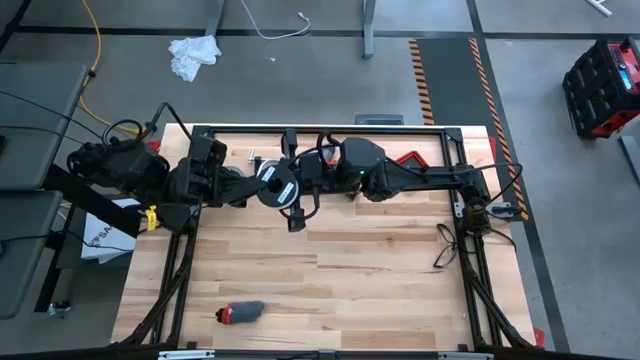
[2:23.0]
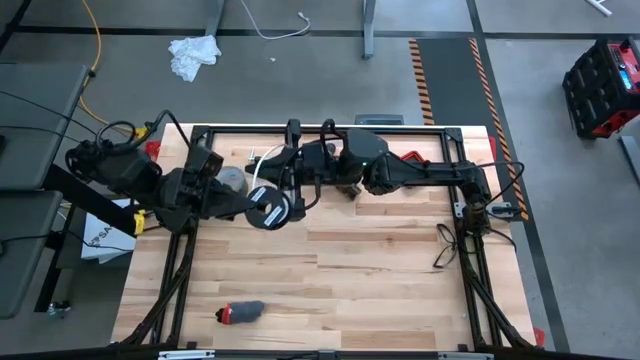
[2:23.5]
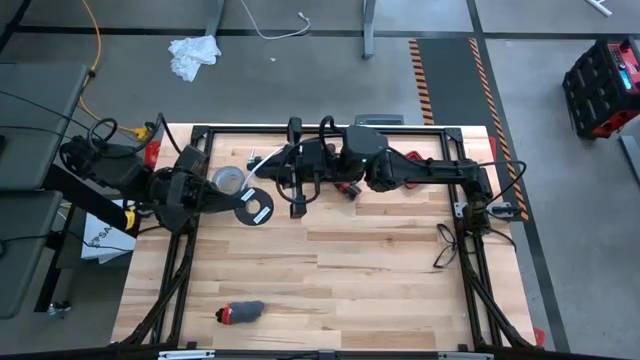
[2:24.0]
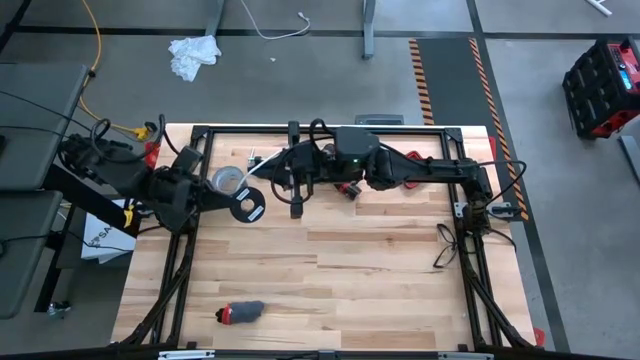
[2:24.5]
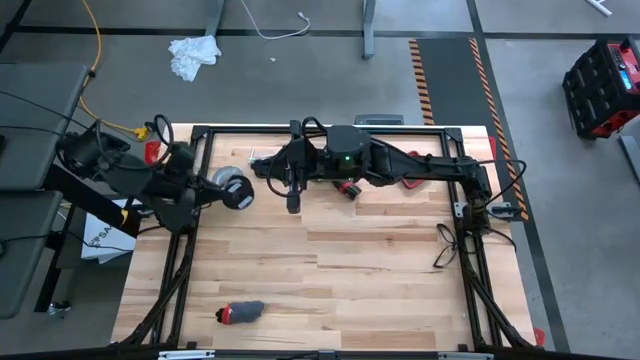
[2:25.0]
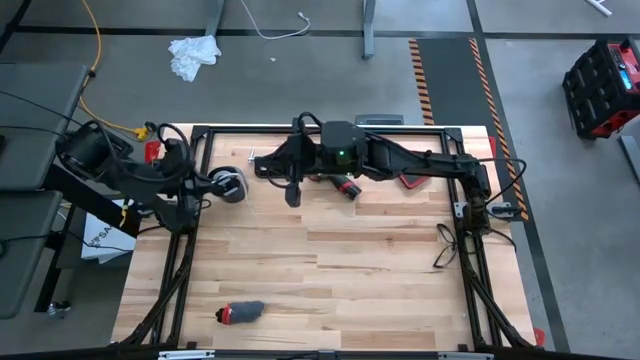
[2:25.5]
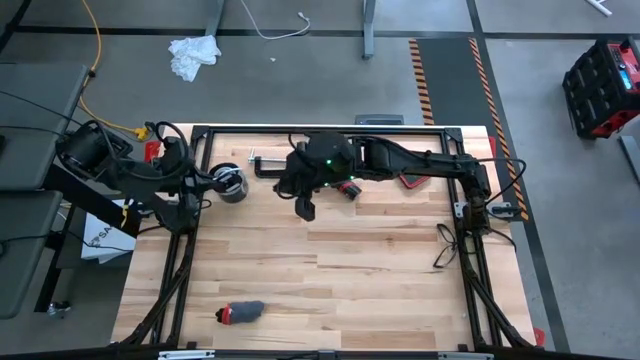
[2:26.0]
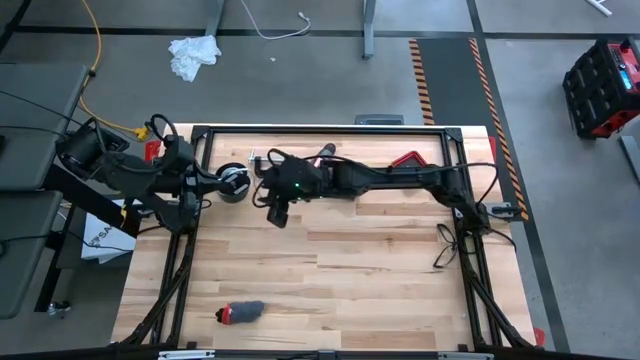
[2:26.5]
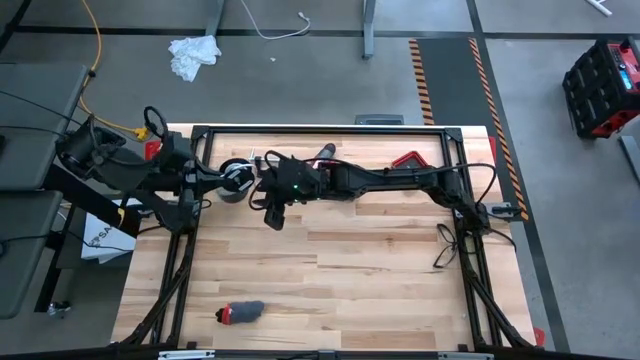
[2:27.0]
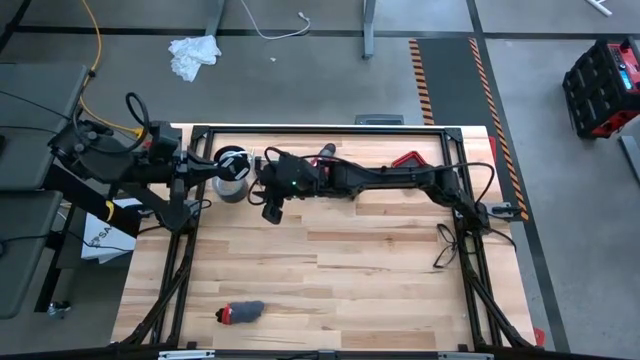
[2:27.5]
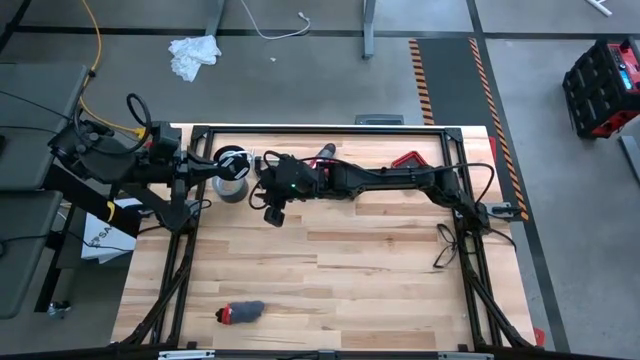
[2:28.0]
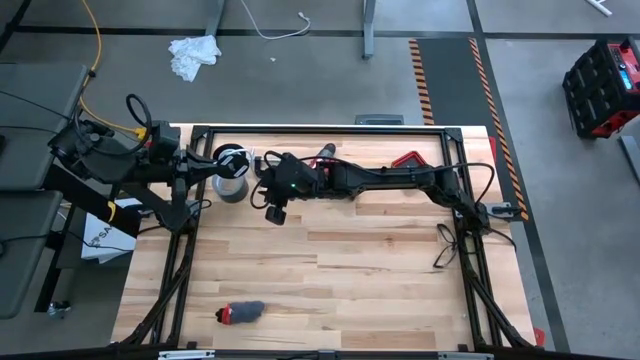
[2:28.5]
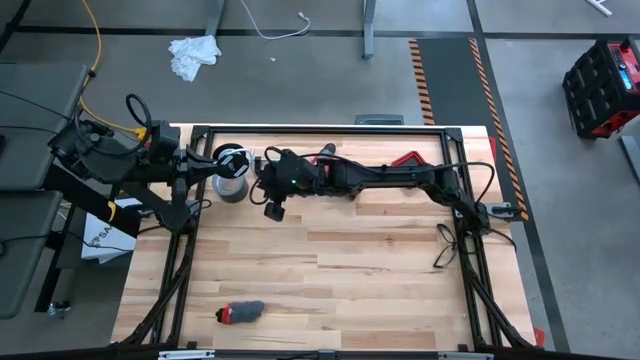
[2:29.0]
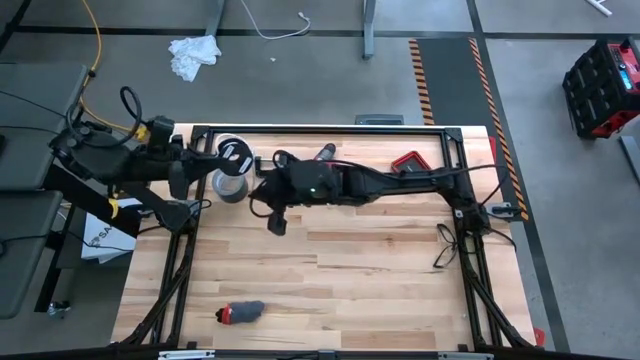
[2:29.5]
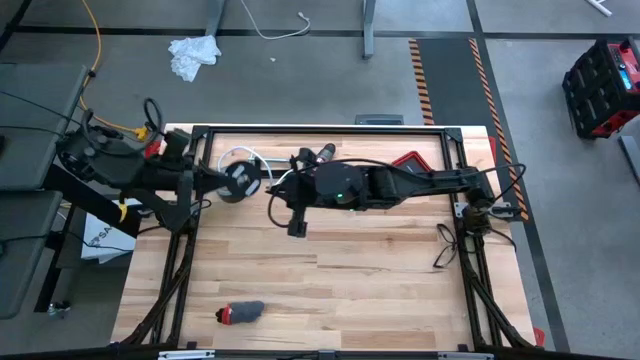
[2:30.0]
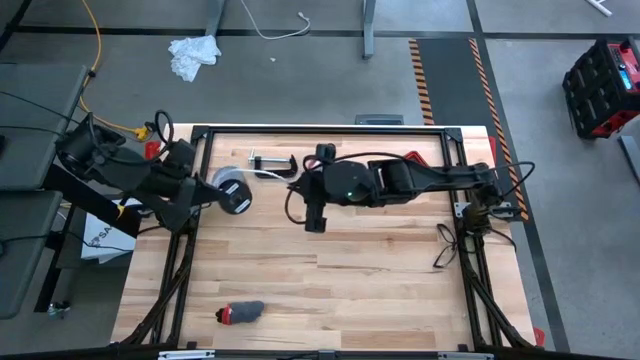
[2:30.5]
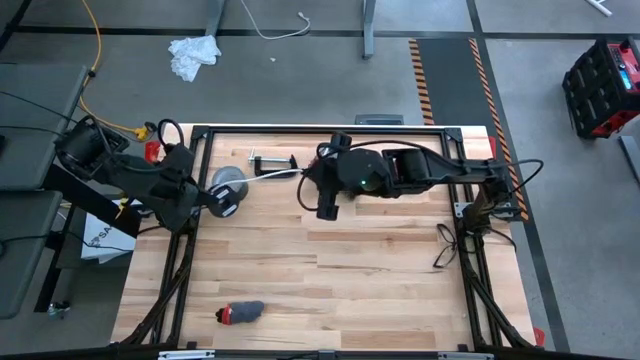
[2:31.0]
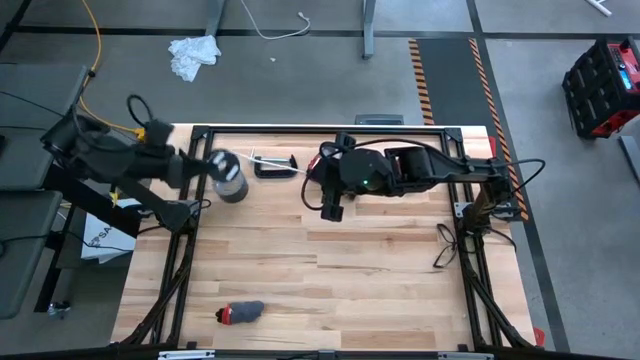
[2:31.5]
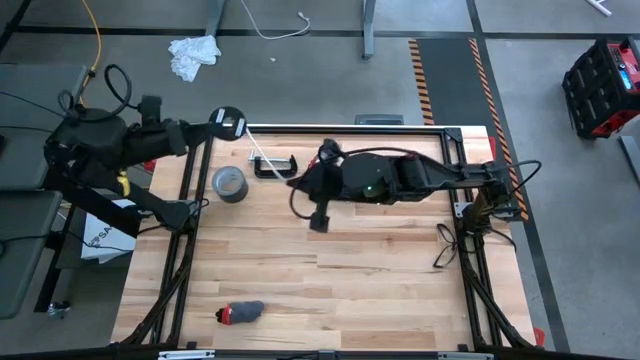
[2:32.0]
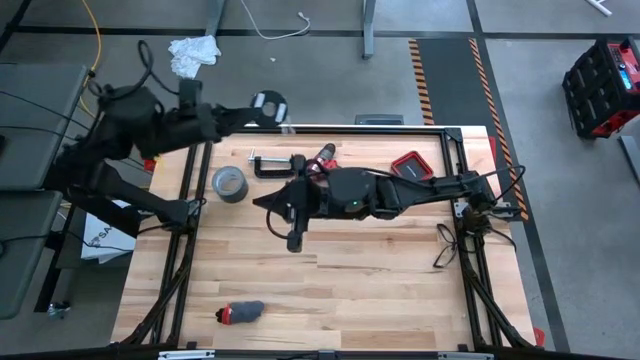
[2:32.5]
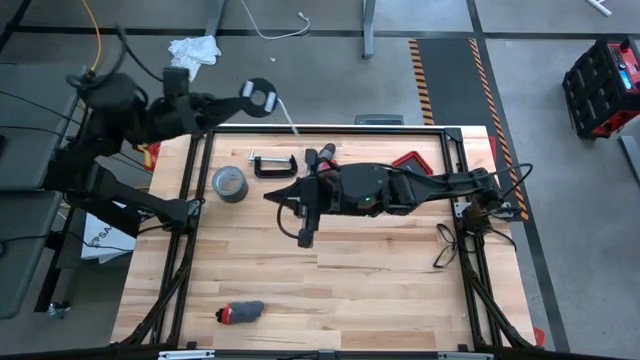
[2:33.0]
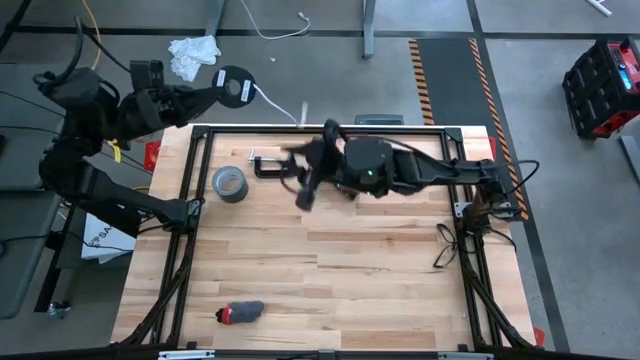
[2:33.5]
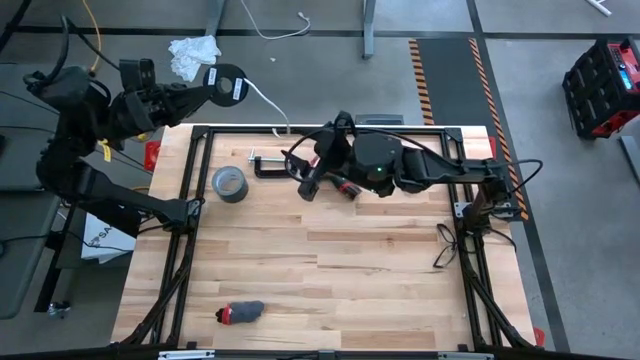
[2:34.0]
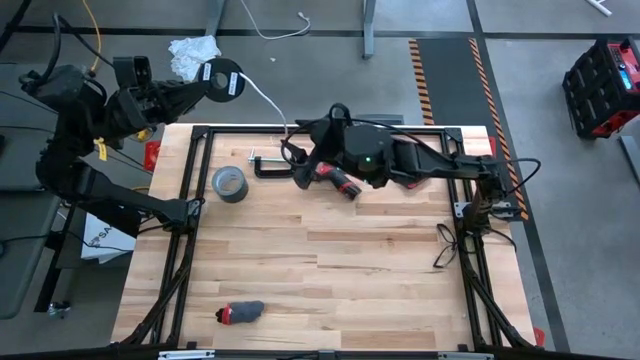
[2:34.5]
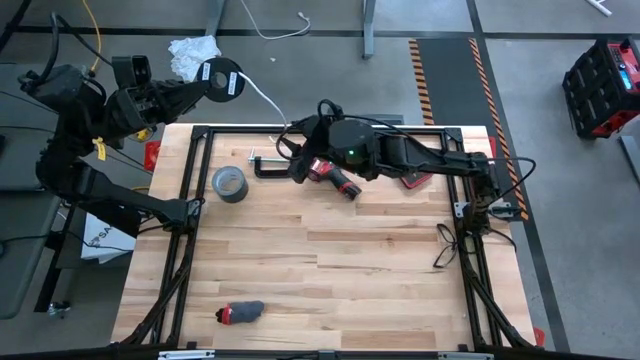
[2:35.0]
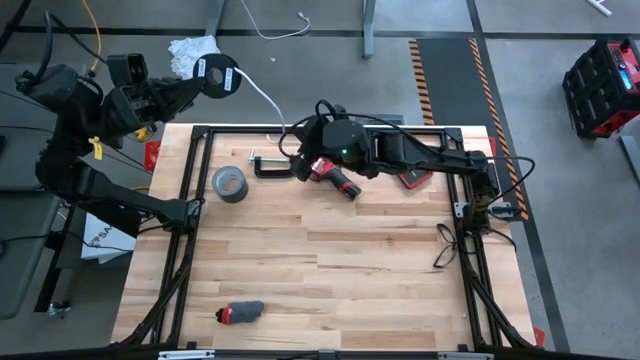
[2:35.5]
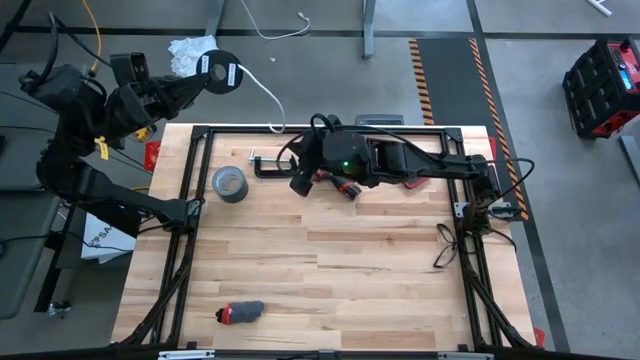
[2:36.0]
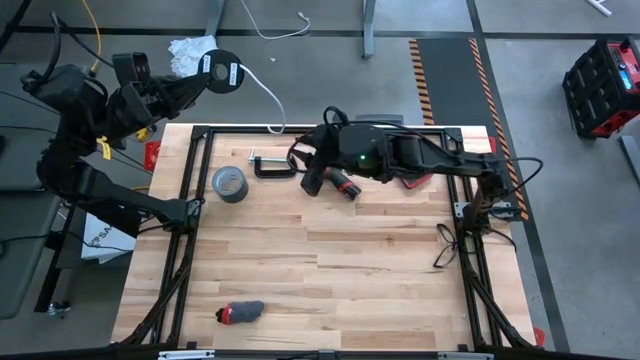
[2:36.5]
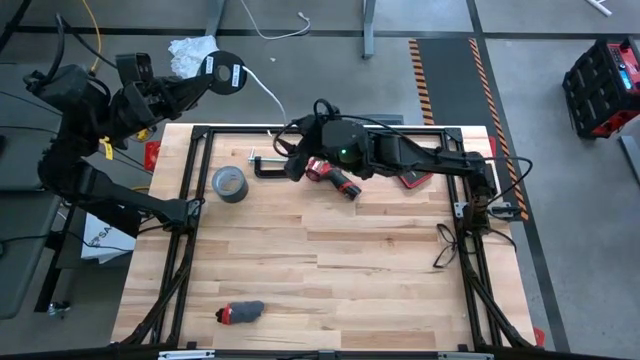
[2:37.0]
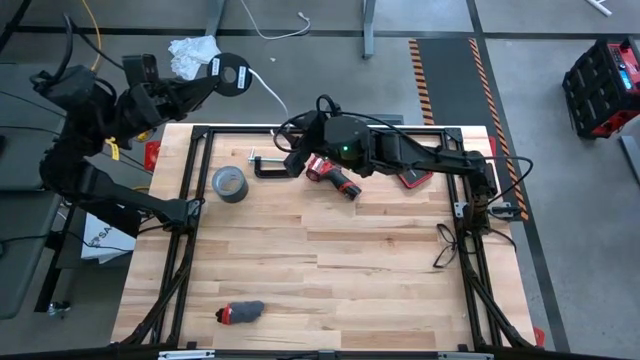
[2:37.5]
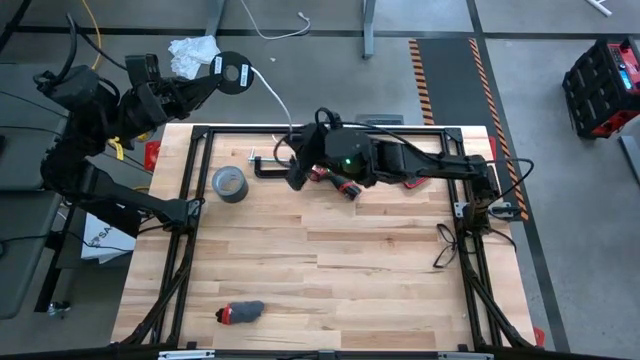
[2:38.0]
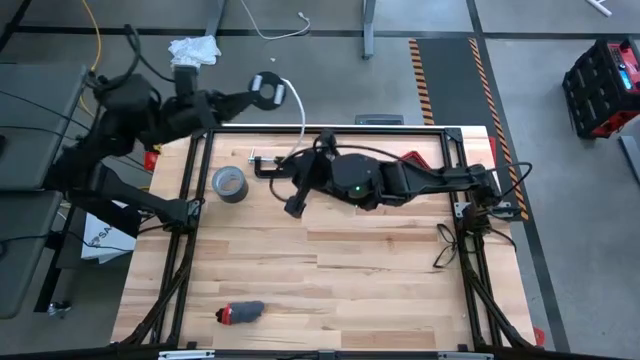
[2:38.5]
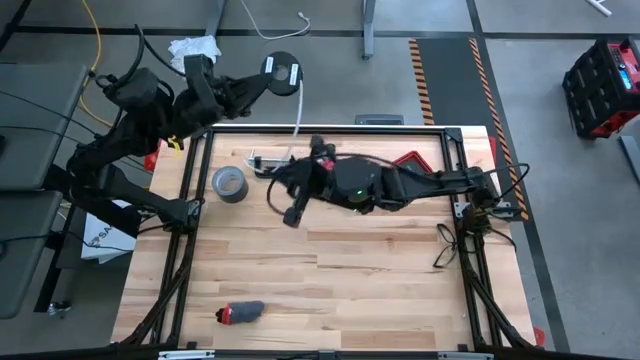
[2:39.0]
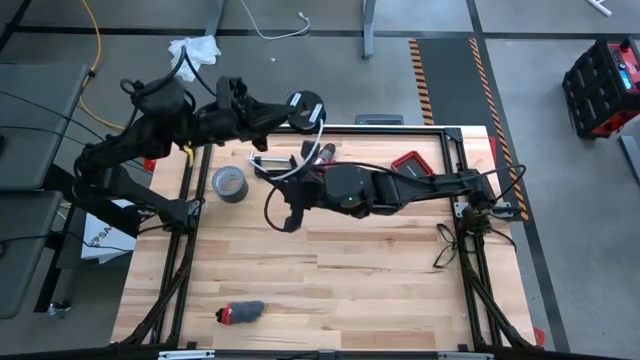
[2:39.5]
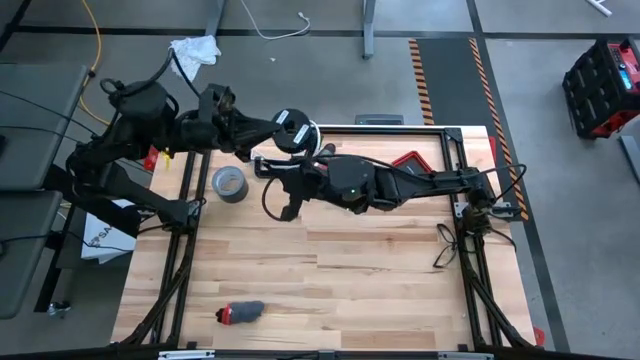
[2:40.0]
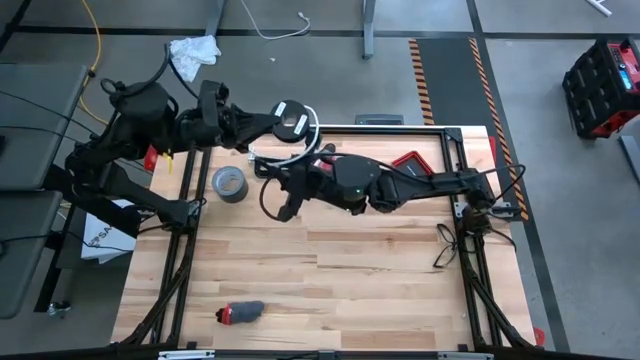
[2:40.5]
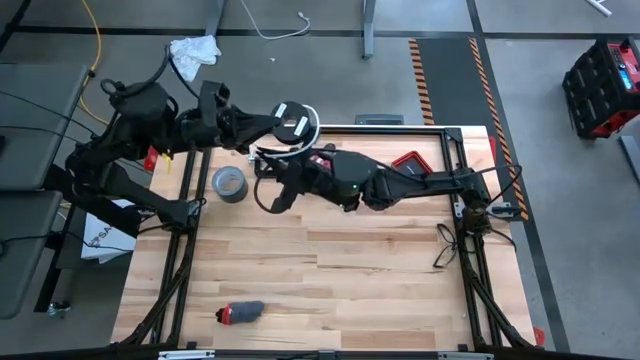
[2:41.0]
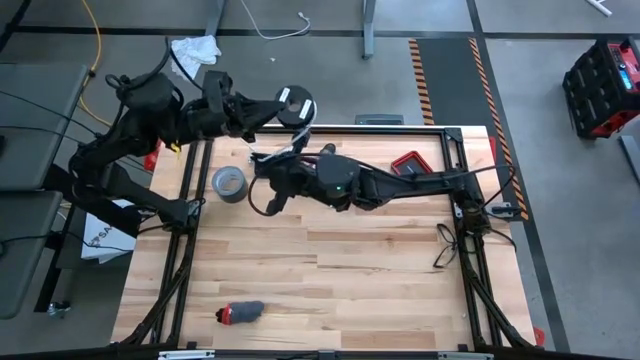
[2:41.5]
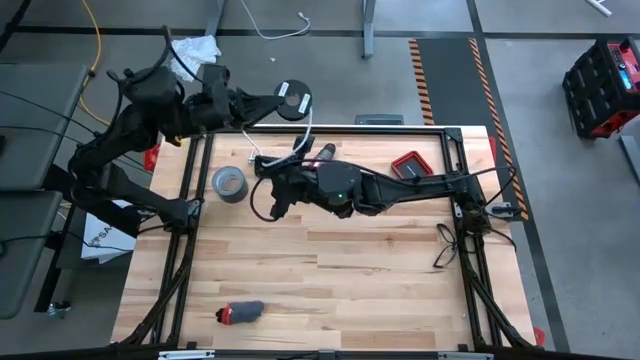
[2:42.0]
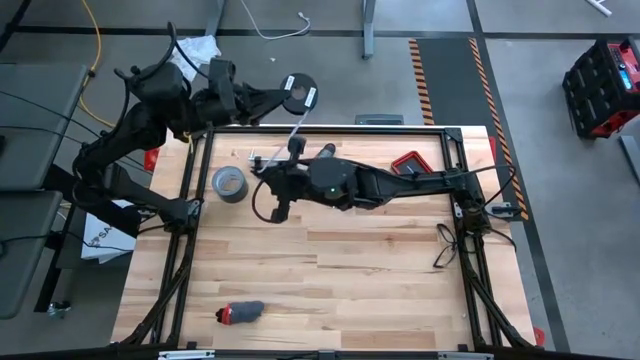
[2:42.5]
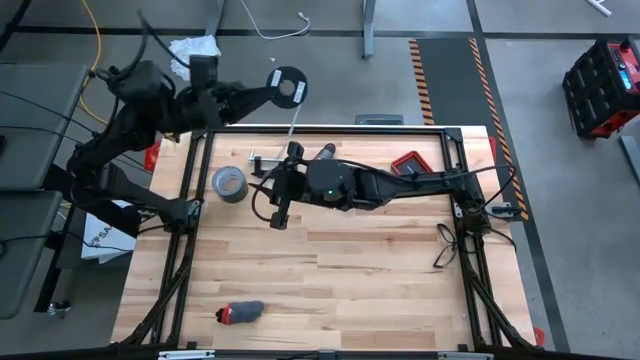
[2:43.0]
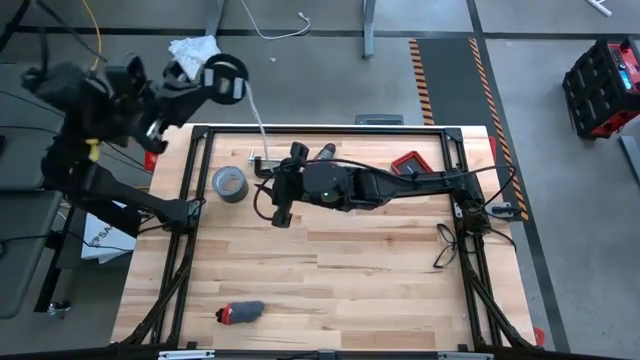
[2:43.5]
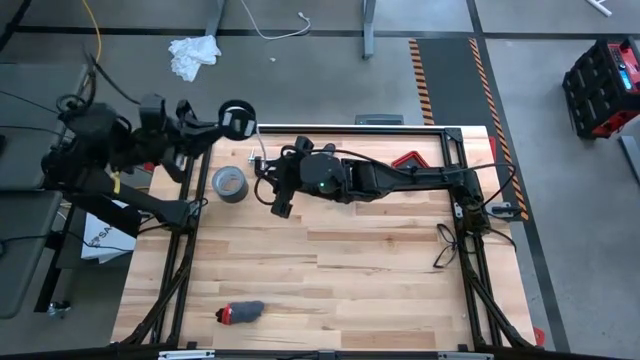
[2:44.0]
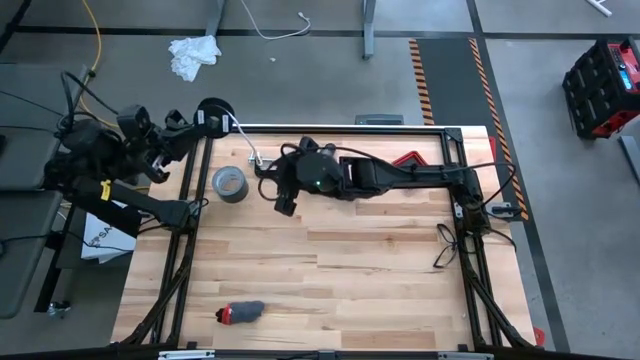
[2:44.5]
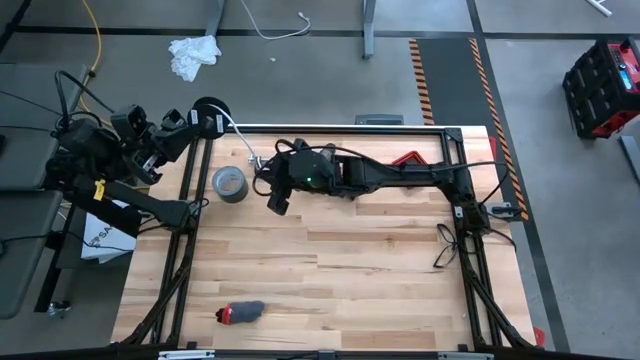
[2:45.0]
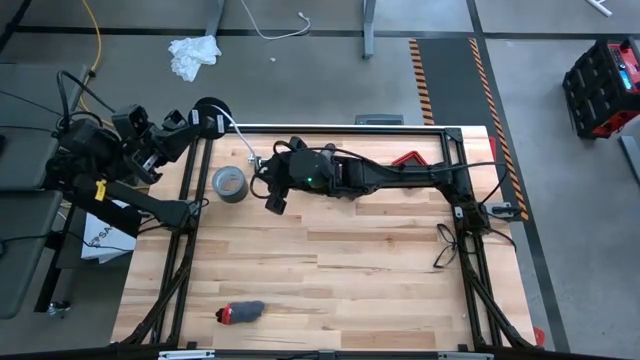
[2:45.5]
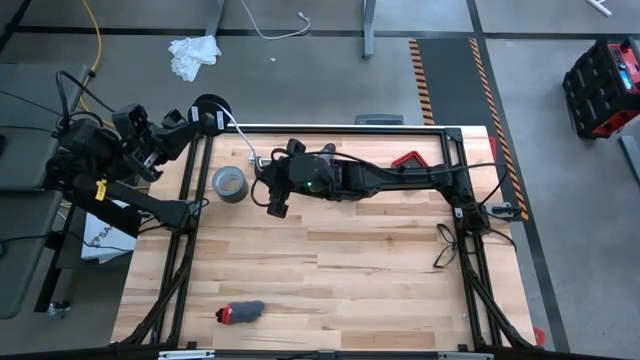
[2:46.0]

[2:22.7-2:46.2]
Task: Coil cords
Coil the white cable wire into the black spool
